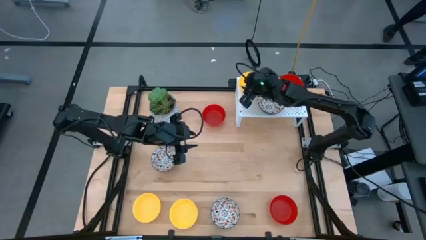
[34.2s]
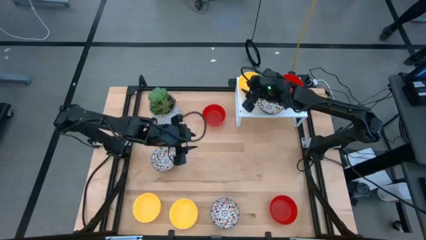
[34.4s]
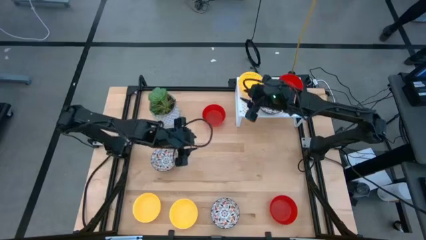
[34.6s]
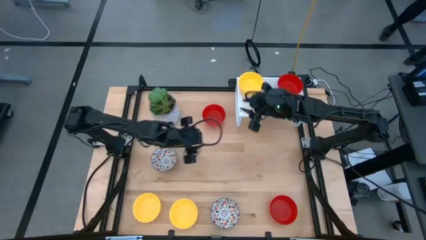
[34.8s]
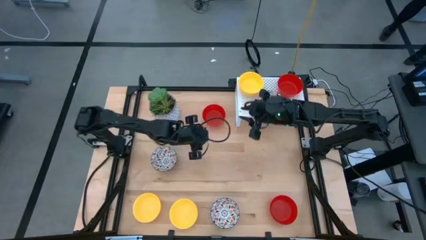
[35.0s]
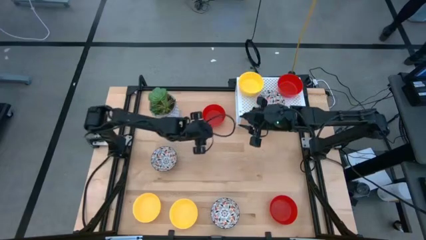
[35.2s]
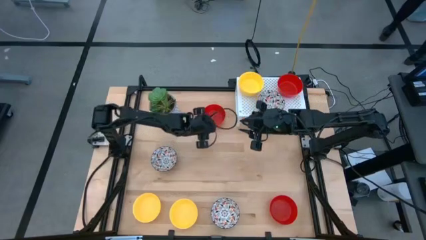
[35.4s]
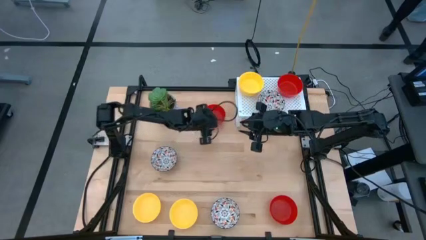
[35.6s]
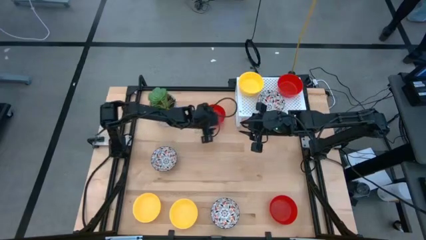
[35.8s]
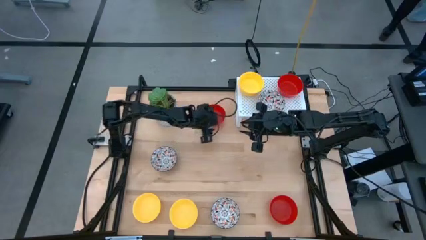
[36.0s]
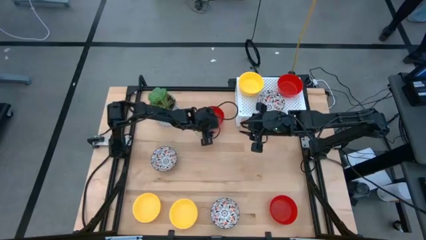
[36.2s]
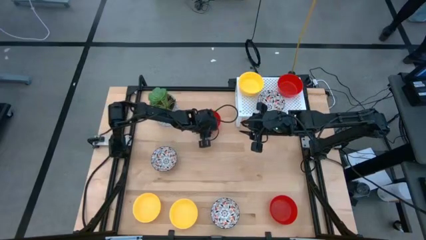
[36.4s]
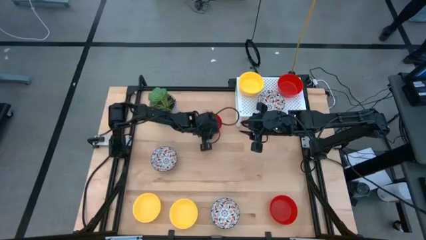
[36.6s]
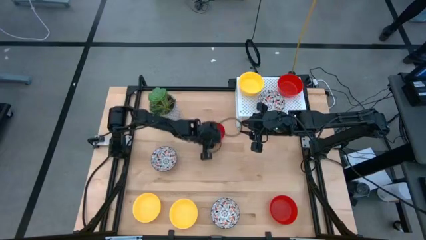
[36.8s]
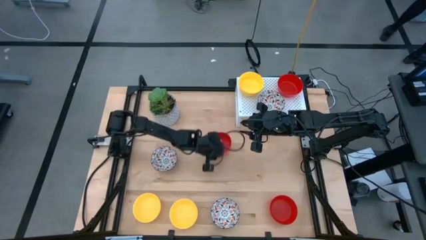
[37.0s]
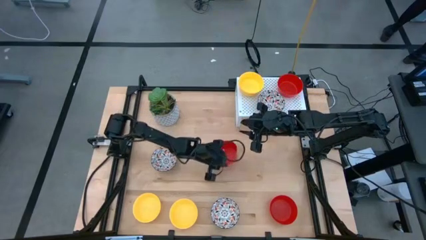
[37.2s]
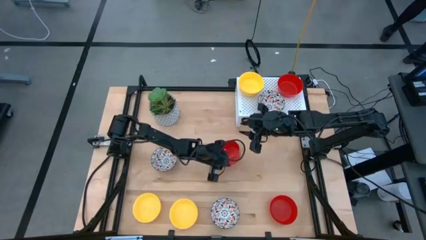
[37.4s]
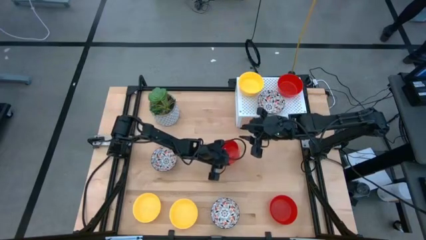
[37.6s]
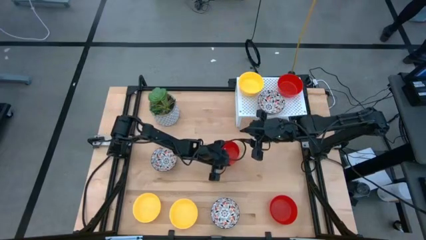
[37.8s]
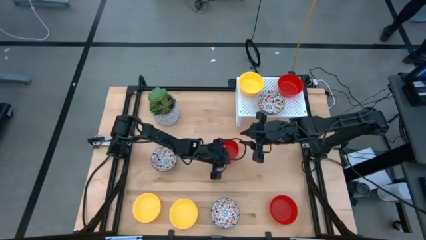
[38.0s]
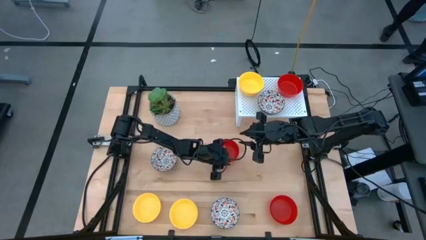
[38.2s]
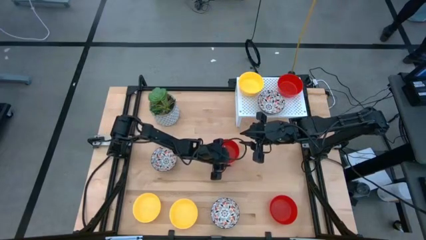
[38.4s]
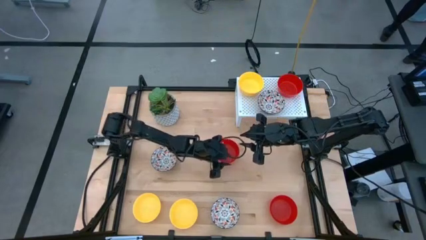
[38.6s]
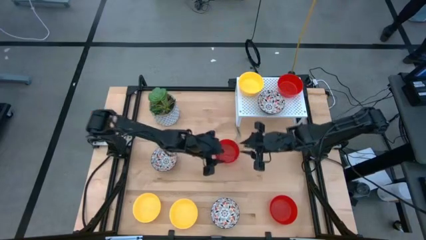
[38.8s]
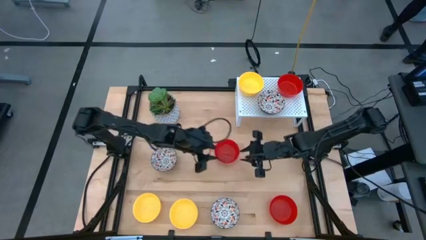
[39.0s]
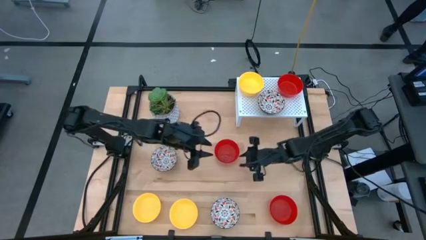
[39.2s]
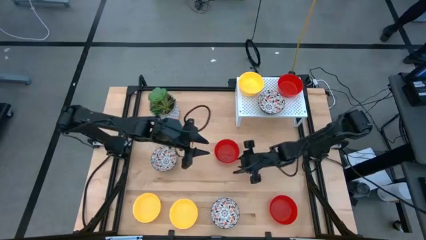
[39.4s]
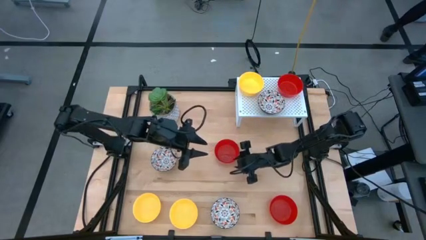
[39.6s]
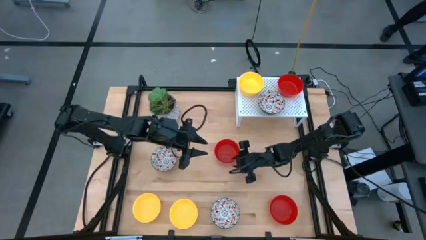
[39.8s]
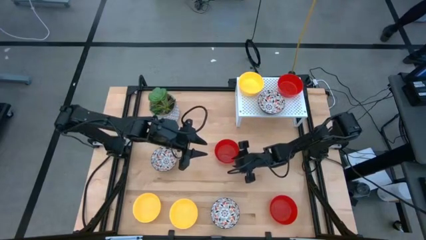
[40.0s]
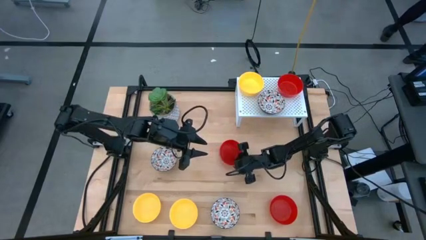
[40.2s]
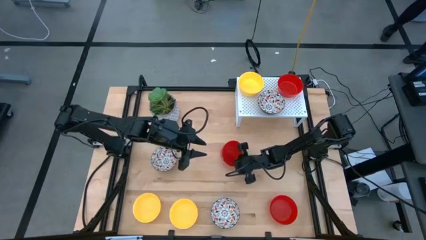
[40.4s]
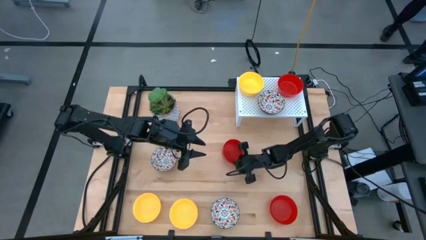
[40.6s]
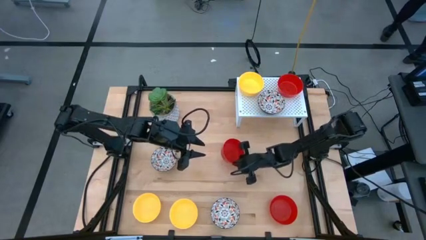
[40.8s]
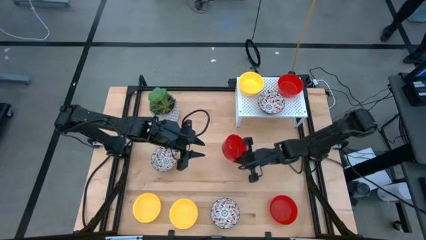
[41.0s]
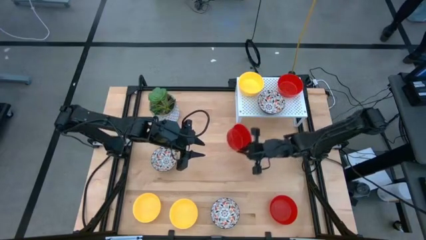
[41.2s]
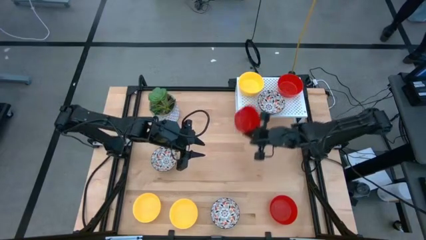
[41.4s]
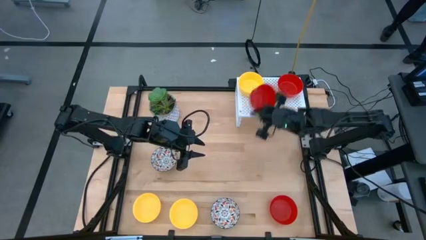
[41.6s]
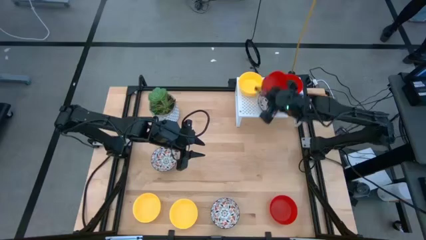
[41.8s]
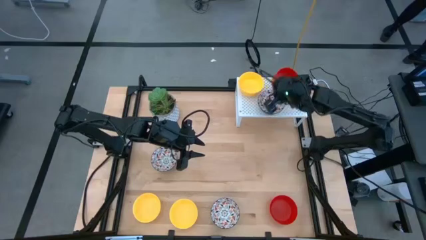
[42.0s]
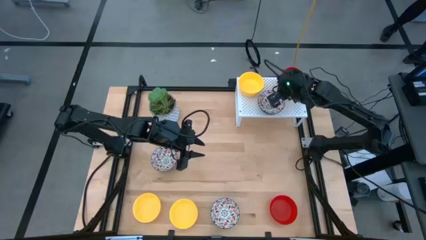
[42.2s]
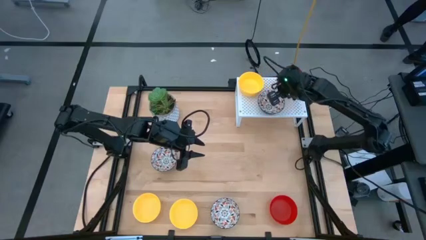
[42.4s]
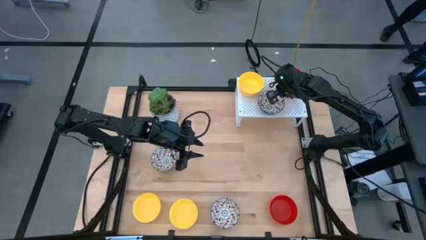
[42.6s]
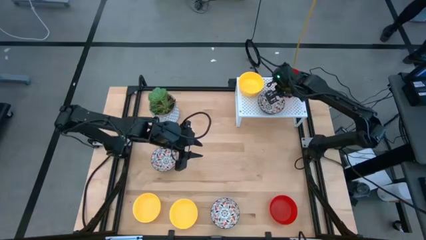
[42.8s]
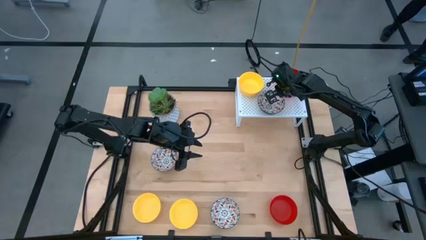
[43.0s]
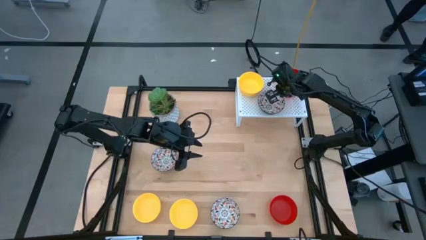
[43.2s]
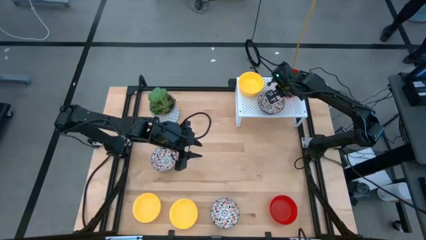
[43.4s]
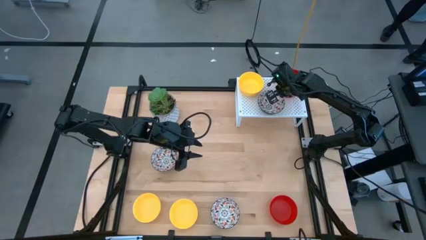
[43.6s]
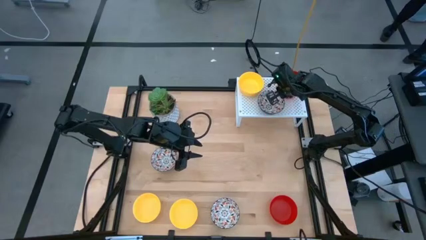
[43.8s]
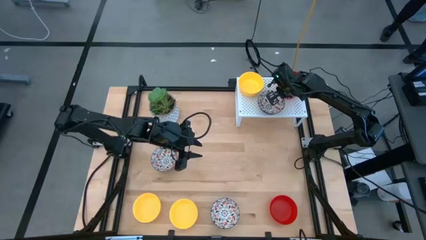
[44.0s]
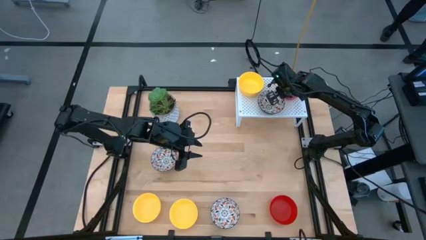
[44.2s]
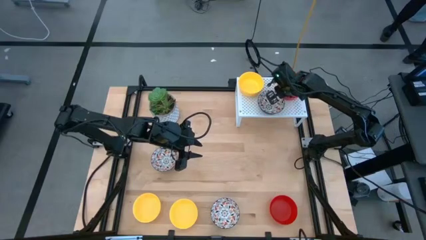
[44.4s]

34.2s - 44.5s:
Task: Pick & Place Mini bowls
Stack the top red bowl on top of the red bowl on the shelf

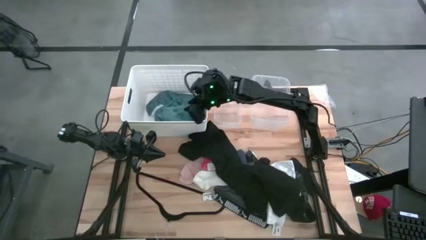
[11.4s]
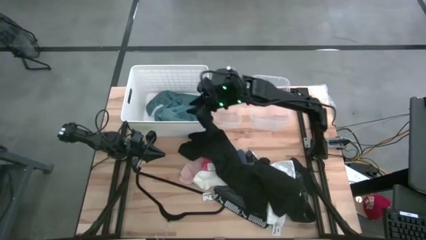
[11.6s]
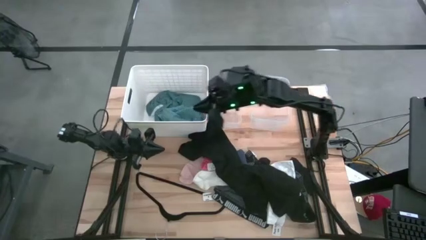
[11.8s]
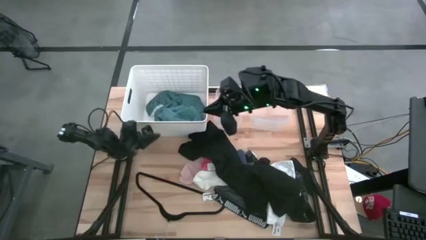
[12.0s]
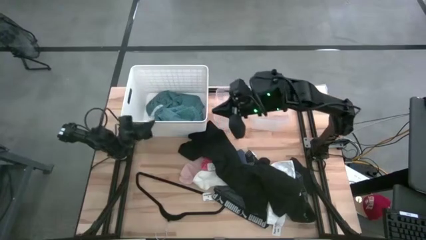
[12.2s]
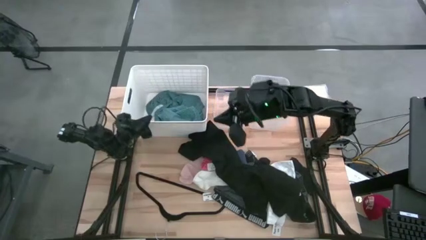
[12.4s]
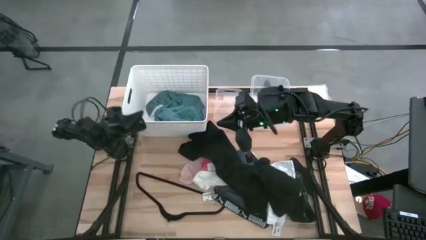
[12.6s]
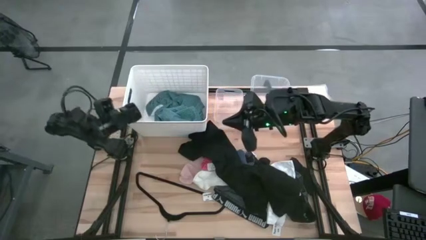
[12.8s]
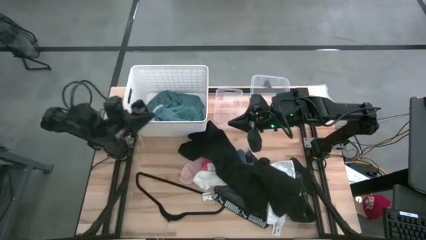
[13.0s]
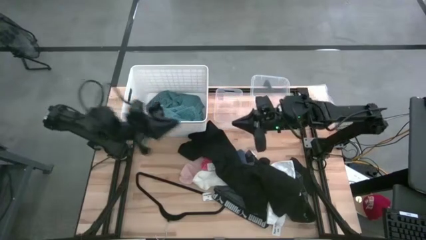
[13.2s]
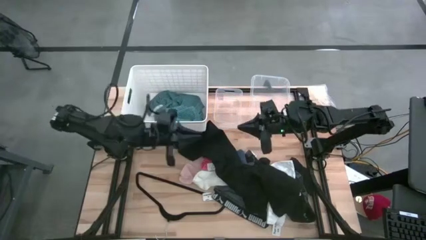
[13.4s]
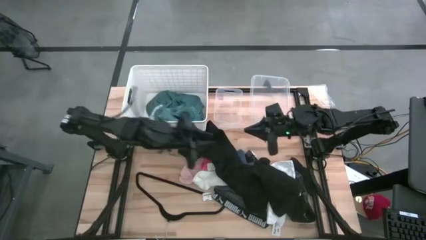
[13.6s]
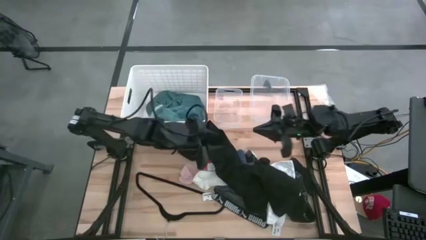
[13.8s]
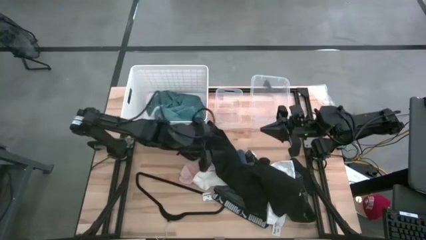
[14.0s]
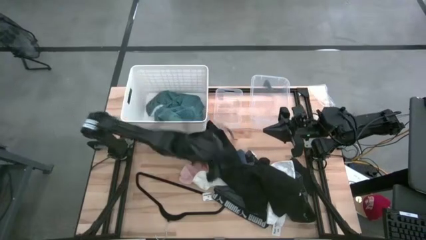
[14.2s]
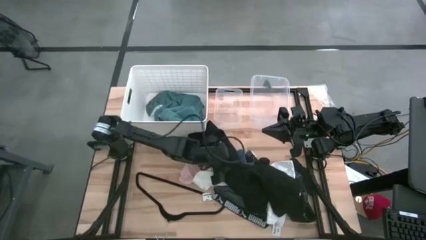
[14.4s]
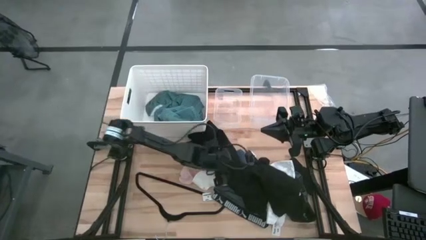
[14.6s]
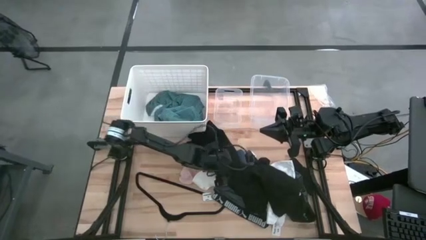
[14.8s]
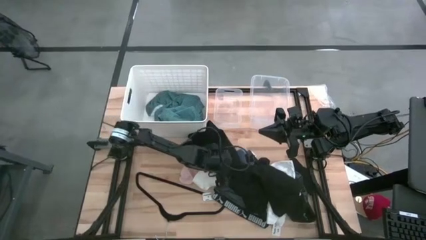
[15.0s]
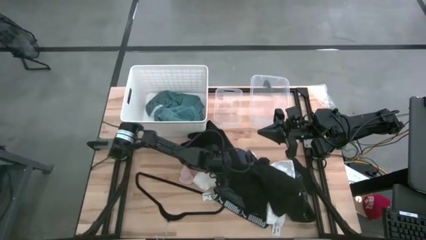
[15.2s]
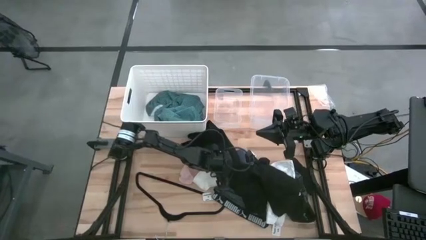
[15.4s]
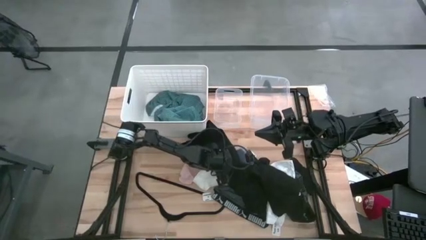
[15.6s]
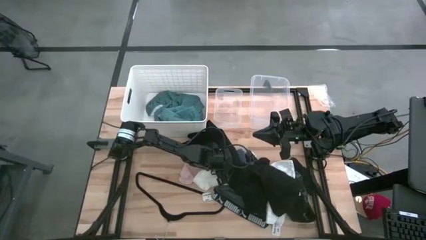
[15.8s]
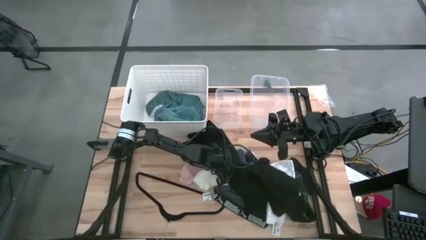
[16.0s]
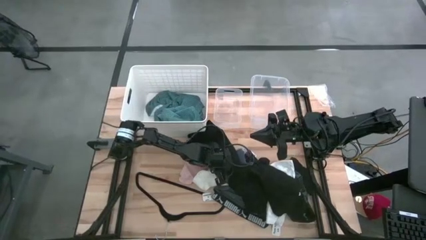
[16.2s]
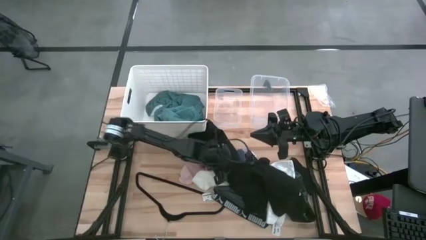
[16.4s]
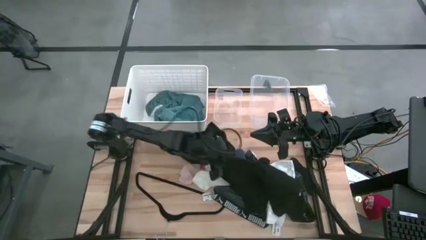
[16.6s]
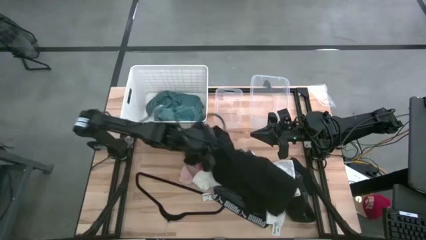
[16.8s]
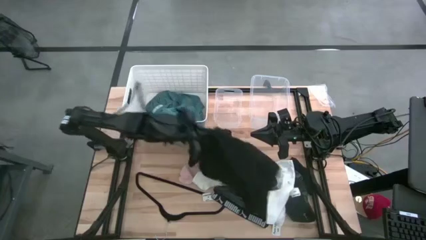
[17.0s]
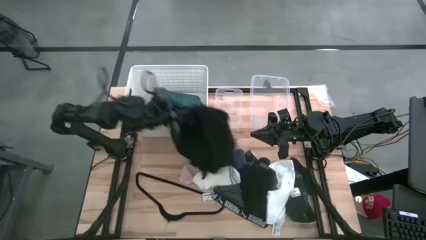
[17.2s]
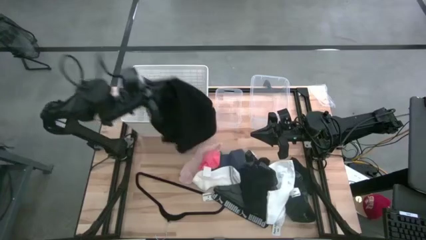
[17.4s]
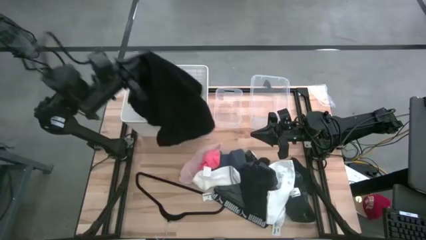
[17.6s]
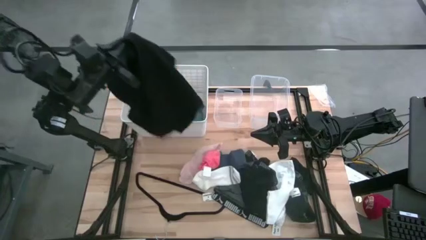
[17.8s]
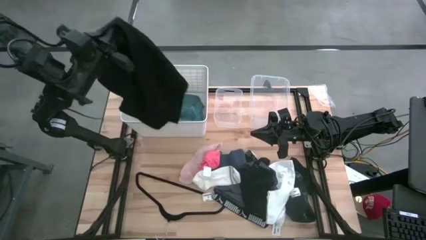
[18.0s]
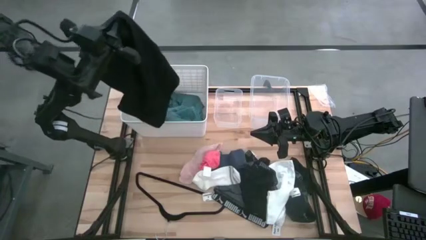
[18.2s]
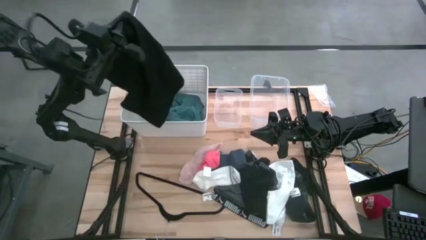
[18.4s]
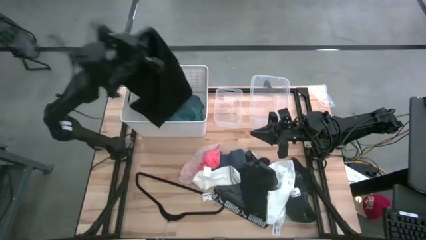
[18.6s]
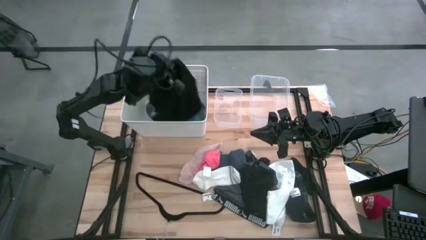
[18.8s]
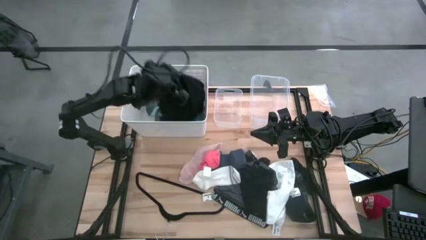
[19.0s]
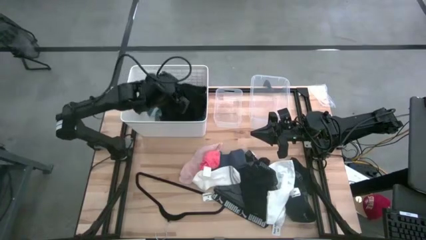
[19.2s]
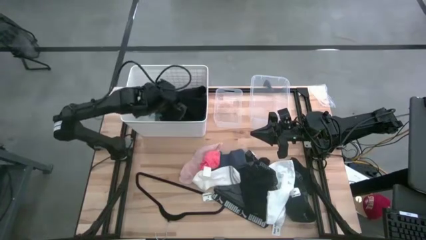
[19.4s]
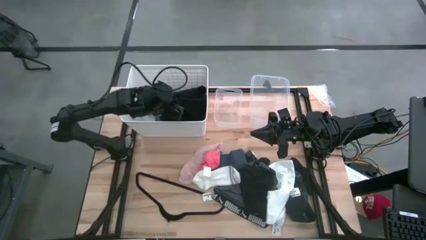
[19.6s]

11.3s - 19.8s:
Task: Pick & Place Cloths
Put the black polo shirt into the white bin
